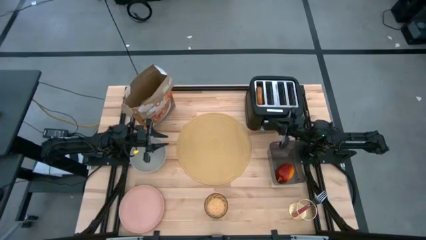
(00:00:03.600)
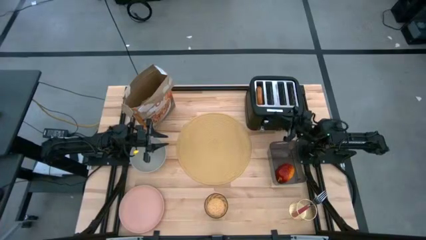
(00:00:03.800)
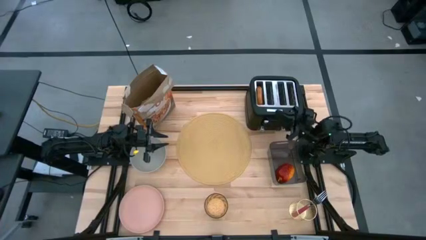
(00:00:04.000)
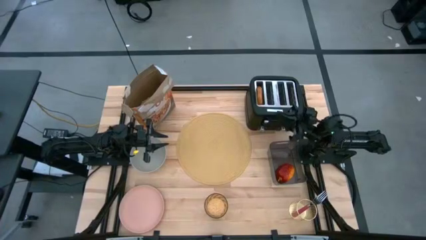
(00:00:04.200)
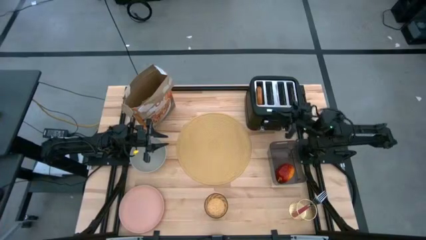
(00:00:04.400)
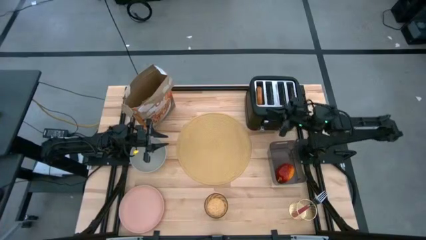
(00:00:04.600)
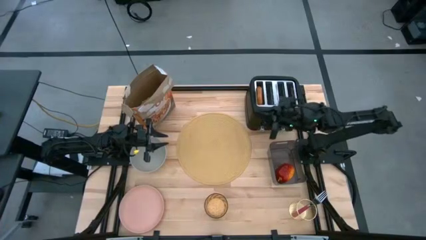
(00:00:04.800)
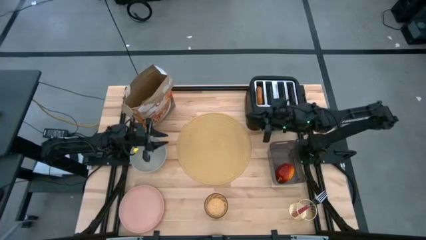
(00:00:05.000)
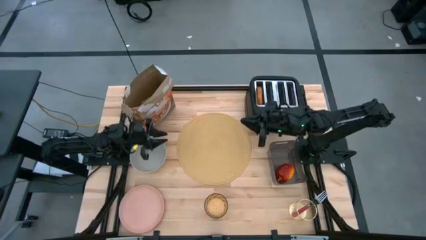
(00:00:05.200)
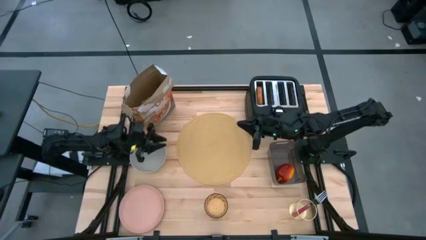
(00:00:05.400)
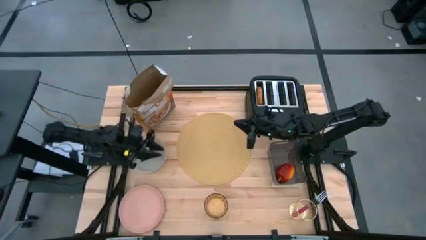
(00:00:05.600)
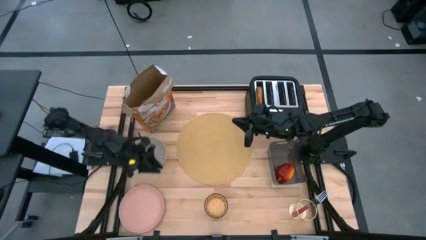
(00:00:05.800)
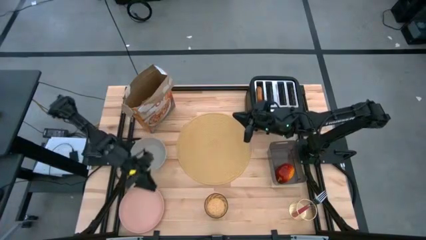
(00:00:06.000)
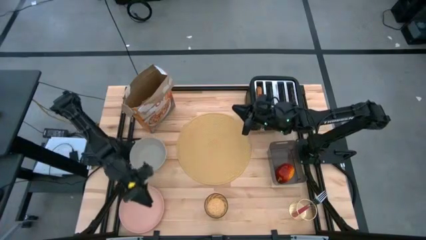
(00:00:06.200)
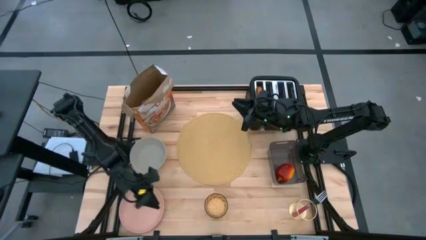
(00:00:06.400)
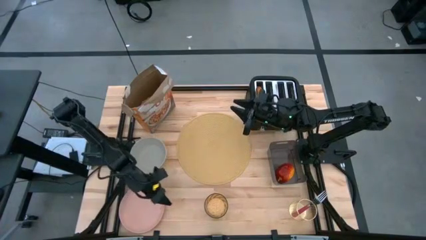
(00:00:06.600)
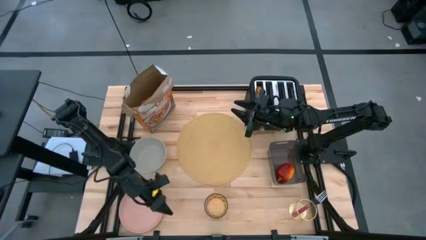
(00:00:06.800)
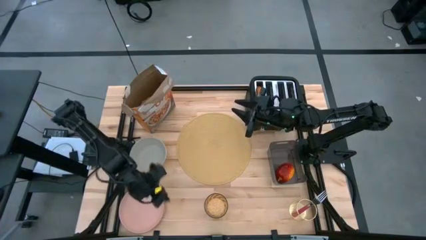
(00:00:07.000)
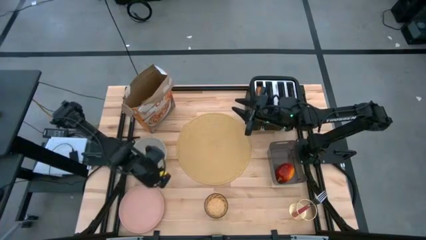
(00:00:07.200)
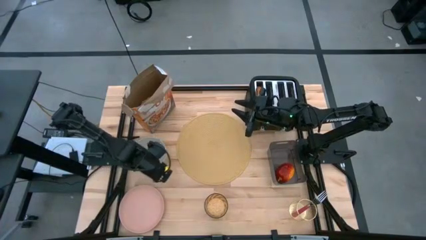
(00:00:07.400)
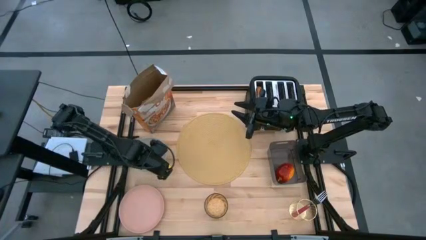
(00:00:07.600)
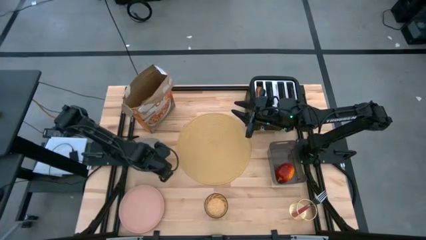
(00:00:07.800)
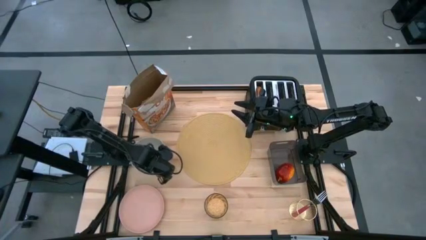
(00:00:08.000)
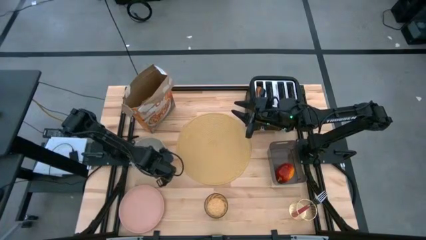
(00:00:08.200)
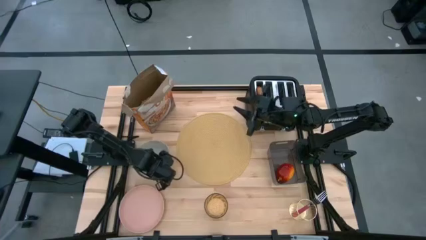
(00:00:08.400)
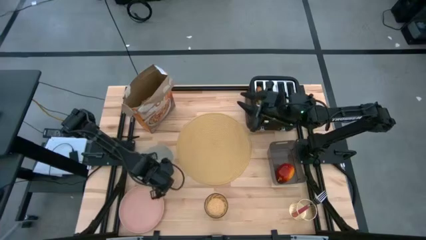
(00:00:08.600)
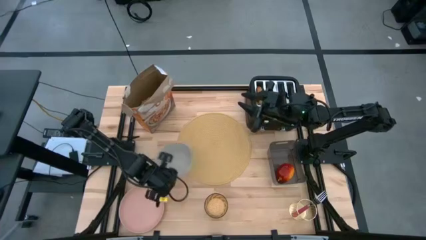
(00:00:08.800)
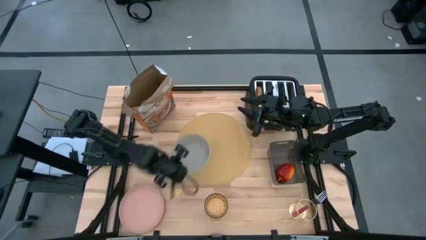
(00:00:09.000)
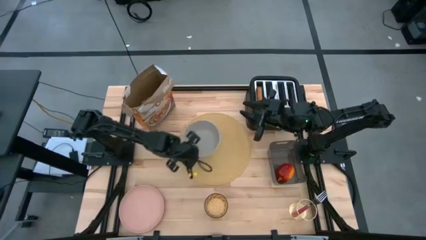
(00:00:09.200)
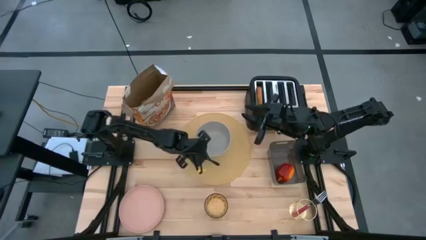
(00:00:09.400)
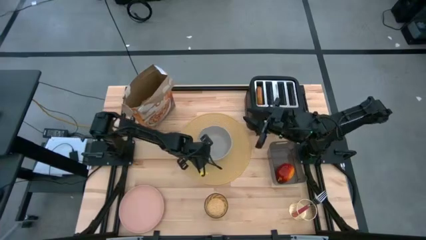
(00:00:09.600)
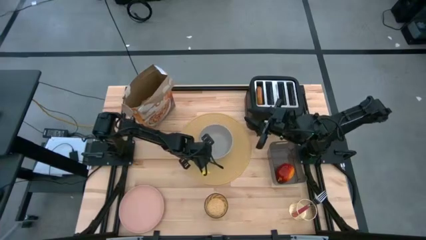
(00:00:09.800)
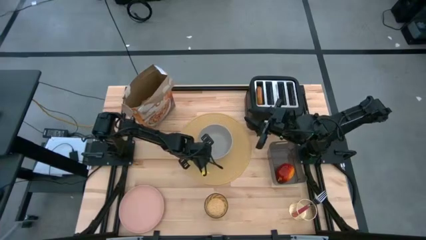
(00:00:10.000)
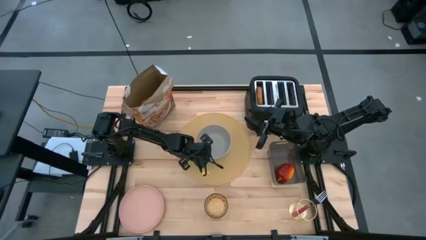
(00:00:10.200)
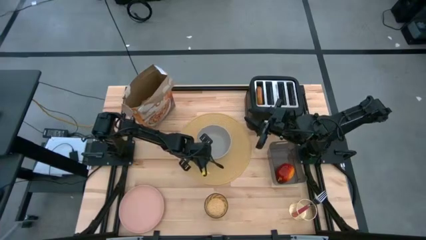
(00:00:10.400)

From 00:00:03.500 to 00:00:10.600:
Task: Arrange a breakfast setting
Put the gray bowl on the brown place mat

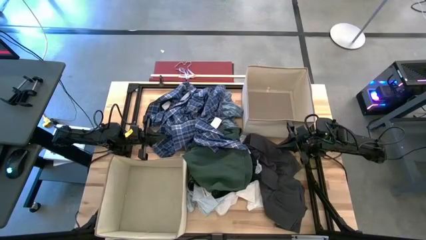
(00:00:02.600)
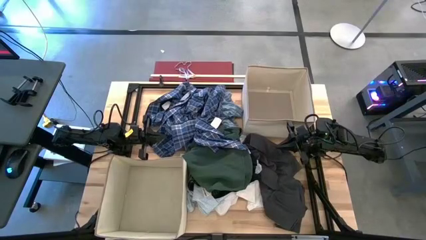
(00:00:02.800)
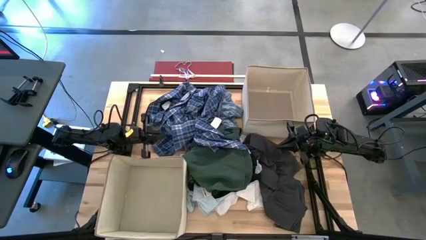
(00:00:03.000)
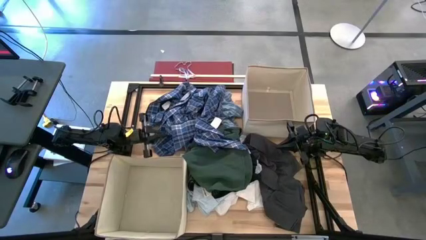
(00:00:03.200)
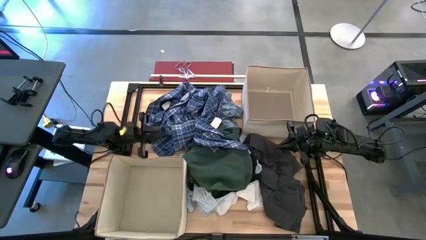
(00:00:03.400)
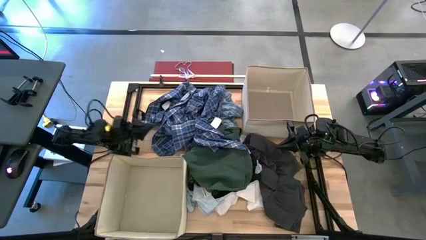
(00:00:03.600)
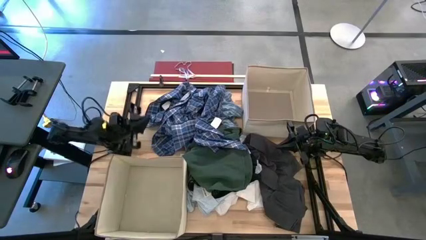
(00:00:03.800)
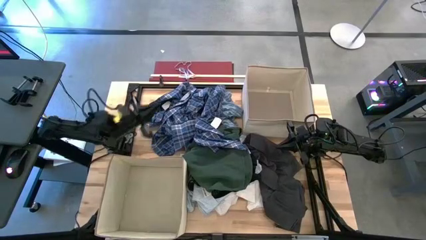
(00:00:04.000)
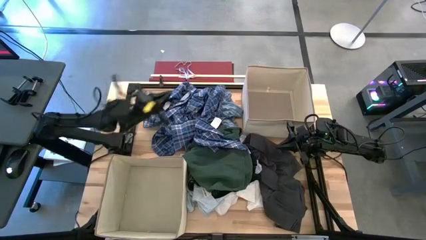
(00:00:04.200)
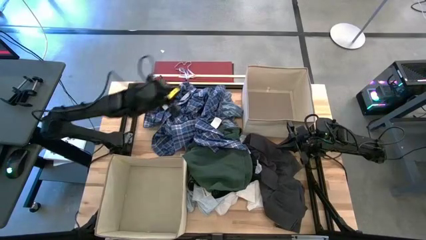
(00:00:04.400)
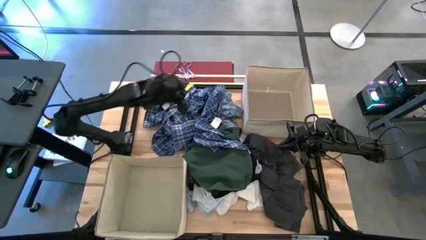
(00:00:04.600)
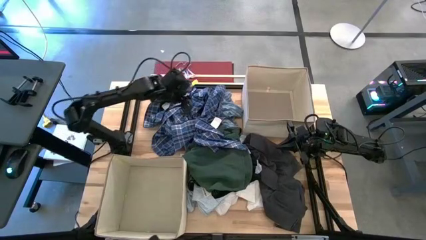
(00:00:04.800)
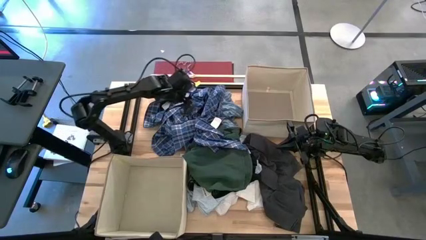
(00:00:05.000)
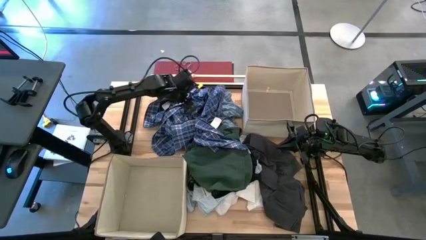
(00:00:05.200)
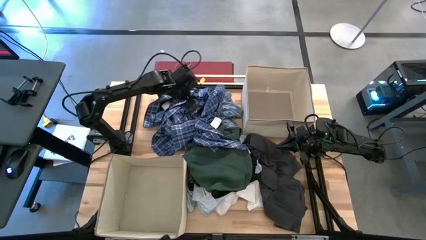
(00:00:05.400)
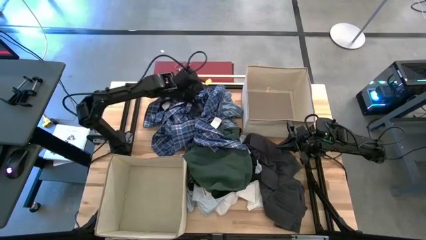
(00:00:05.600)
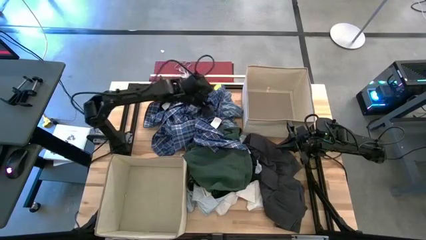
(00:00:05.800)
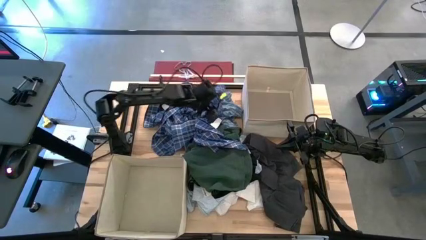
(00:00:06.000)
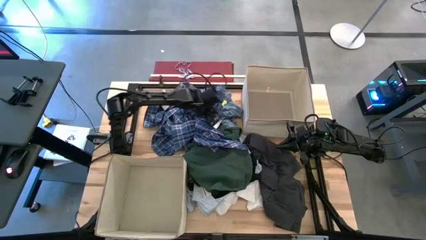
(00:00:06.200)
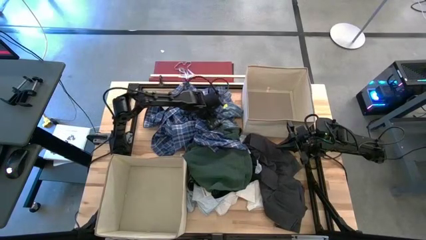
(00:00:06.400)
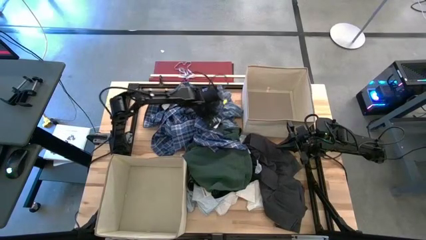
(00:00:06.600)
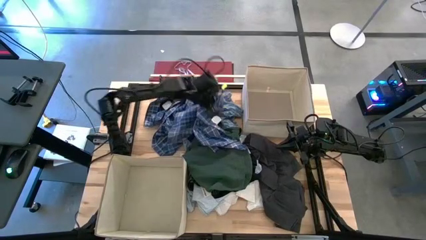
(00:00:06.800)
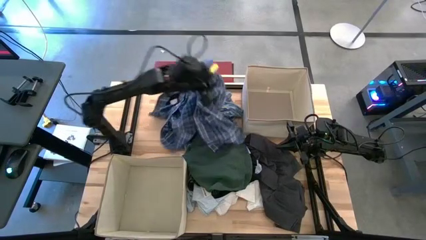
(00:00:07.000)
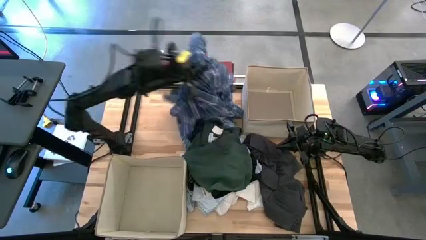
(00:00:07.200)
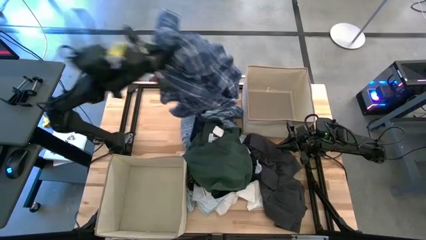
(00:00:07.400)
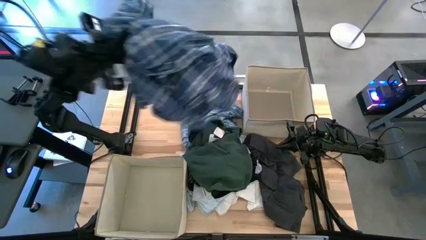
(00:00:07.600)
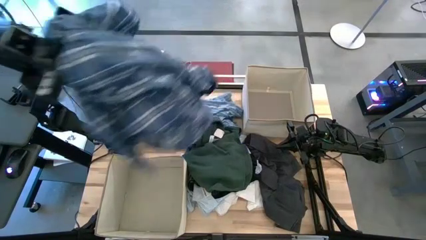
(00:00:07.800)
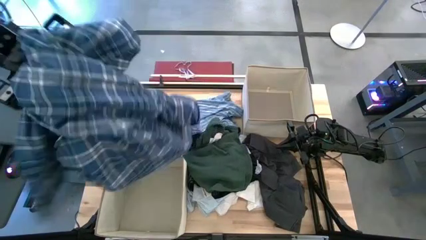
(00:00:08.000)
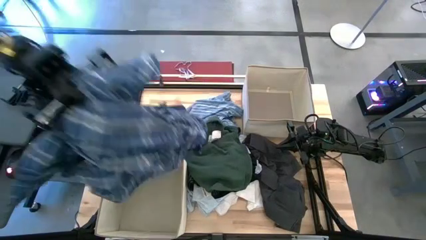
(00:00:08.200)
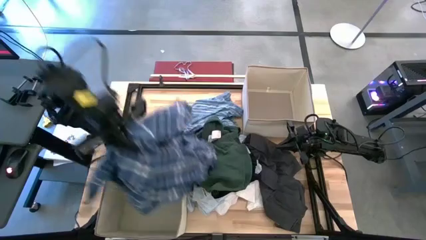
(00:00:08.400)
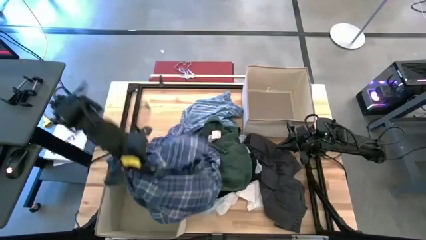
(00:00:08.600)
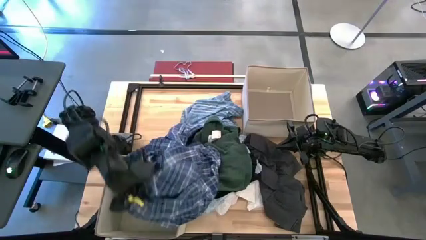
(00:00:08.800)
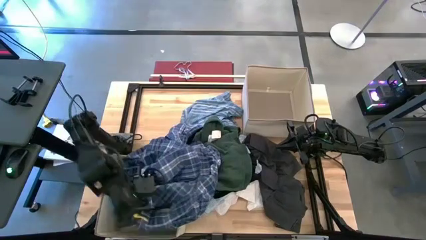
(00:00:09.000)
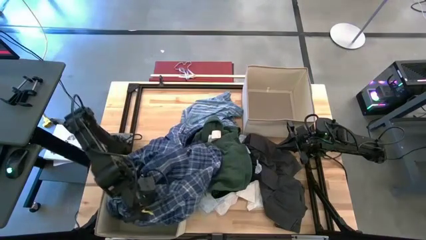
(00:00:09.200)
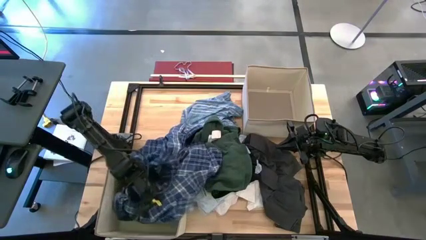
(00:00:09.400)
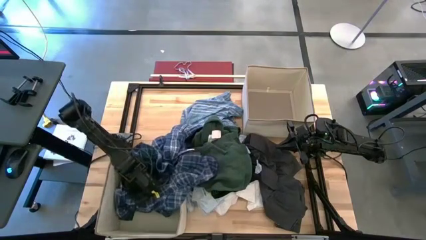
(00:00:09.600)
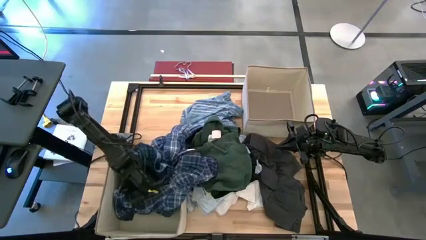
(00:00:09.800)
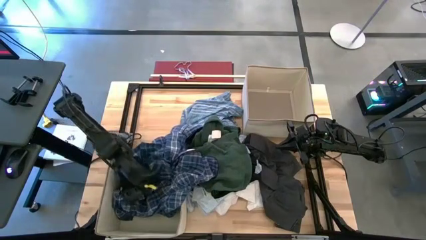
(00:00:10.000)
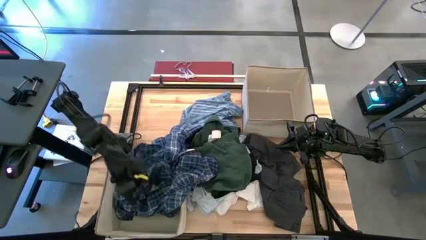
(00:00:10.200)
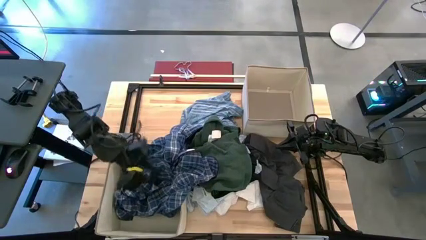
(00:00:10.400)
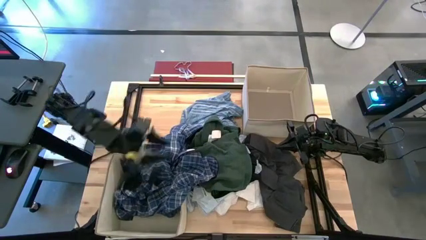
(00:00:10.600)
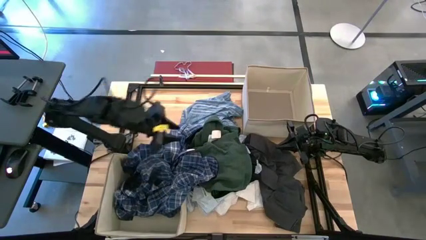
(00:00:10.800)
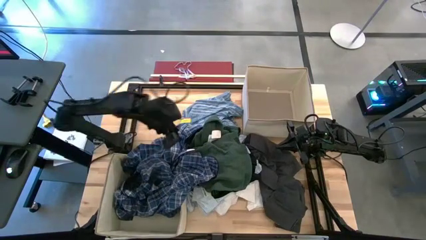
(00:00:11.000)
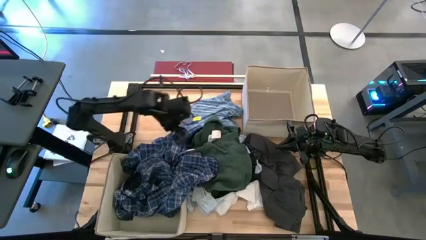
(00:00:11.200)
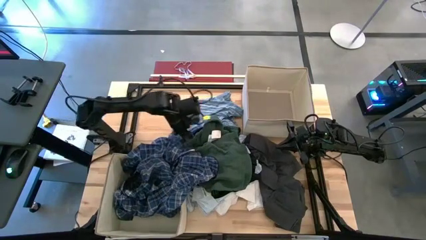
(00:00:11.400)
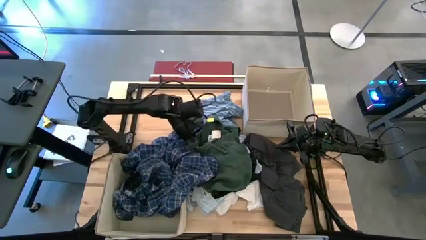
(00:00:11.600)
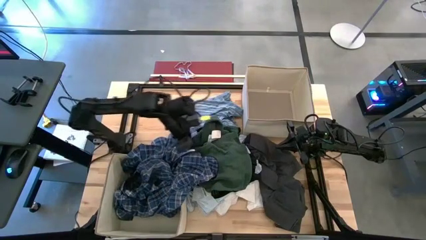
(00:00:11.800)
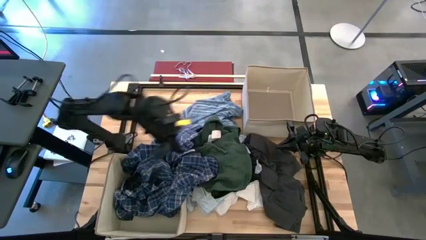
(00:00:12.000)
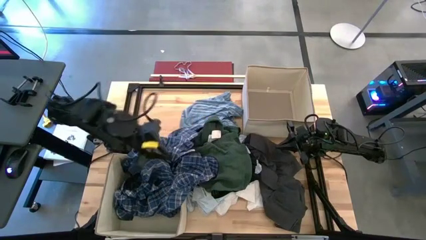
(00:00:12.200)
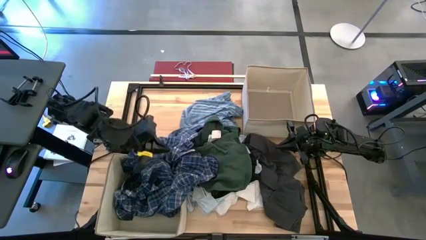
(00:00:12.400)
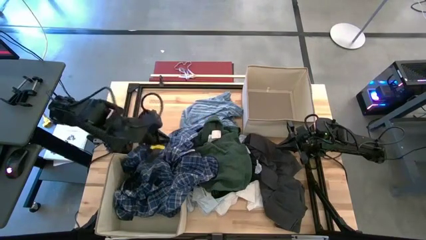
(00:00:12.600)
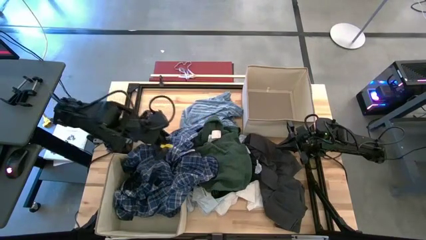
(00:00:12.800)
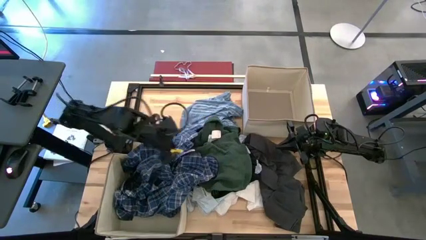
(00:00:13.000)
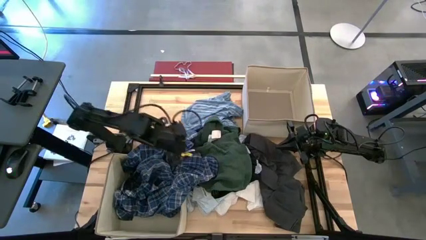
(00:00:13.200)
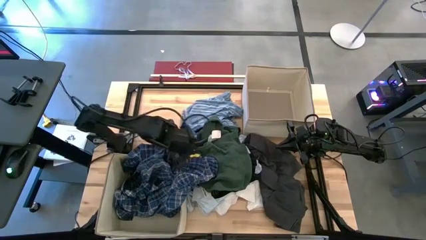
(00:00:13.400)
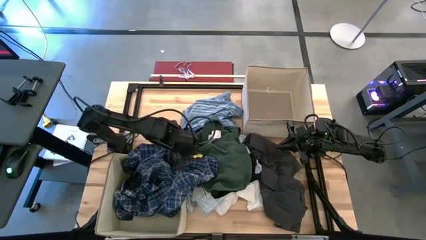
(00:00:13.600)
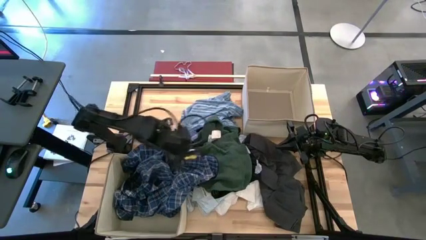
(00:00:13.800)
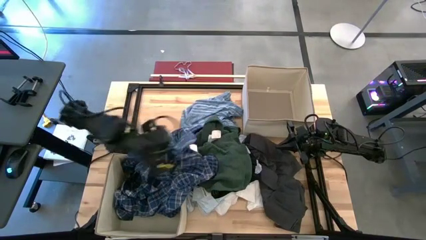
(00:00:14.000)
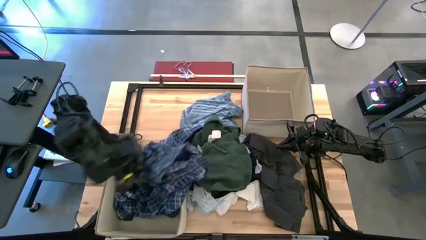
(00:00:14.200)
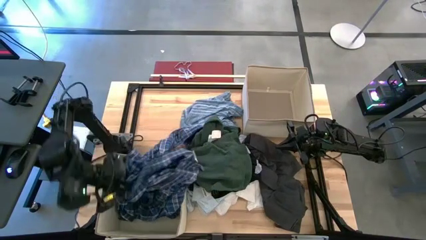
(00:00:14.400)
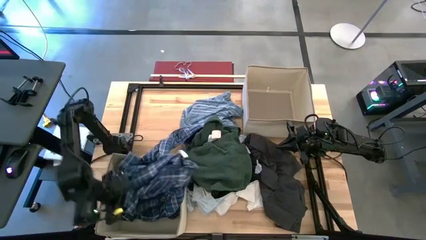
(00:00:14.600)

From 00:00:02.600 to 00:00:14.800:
Task: Sort clothes
Put the blue checkered shirt into the bottom laundry organizer
